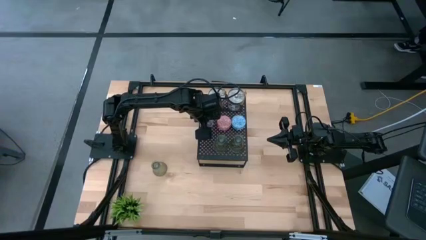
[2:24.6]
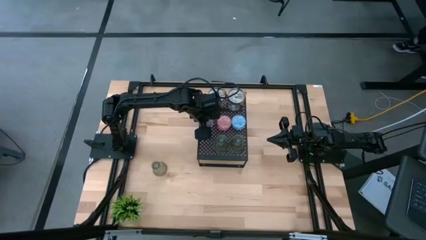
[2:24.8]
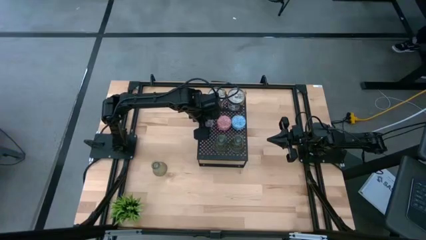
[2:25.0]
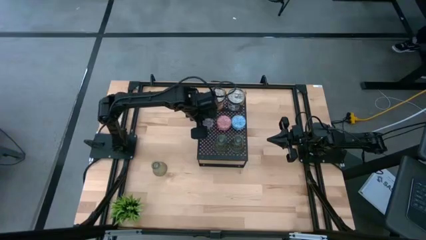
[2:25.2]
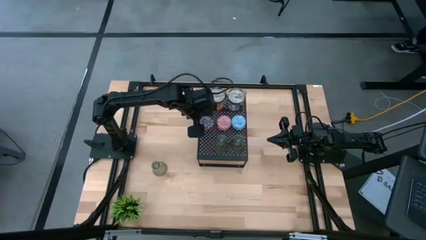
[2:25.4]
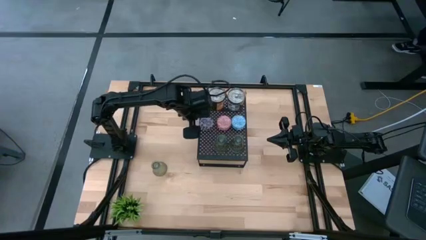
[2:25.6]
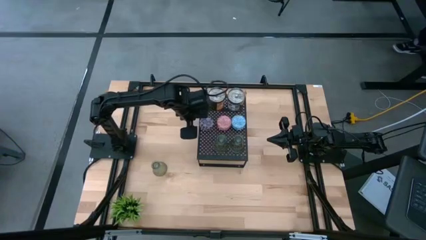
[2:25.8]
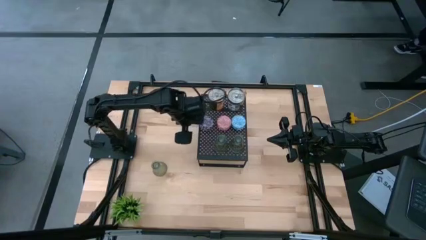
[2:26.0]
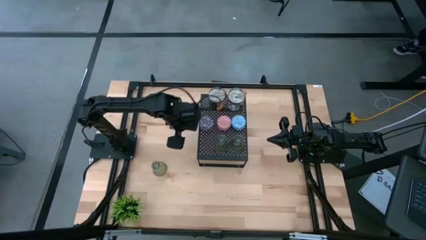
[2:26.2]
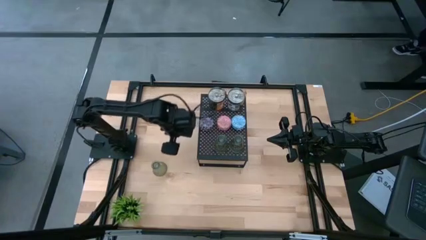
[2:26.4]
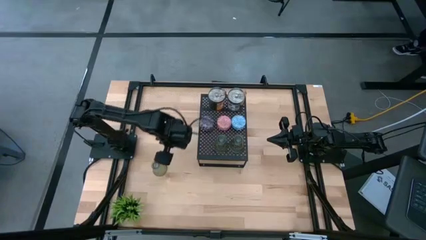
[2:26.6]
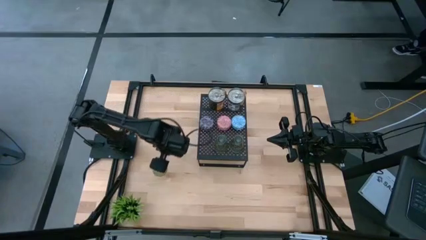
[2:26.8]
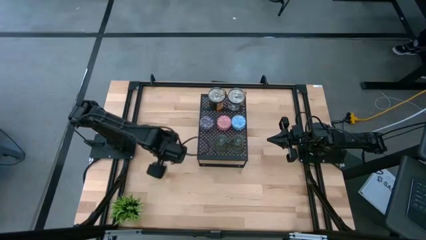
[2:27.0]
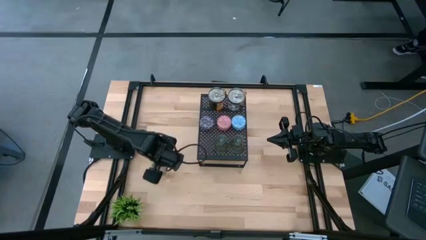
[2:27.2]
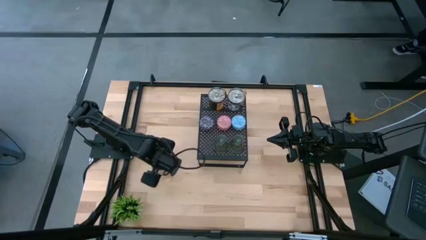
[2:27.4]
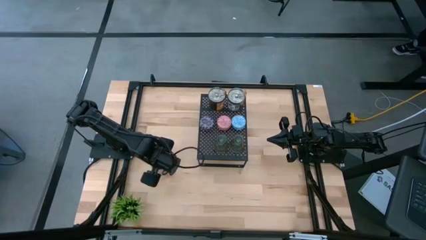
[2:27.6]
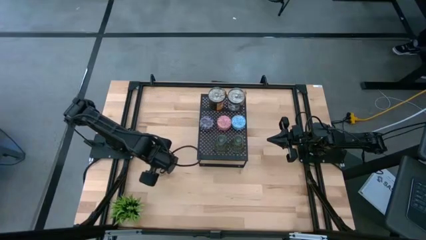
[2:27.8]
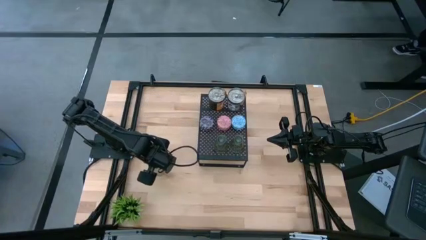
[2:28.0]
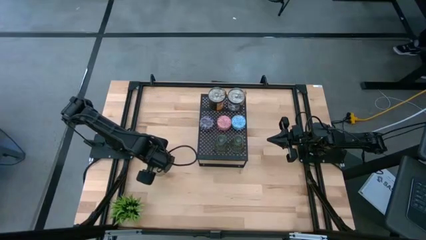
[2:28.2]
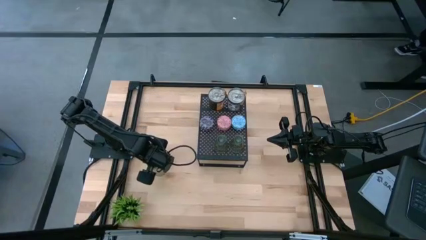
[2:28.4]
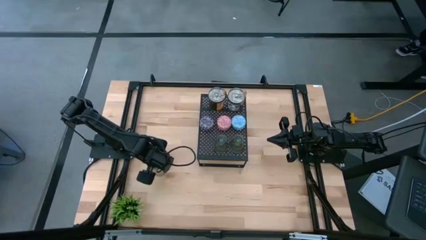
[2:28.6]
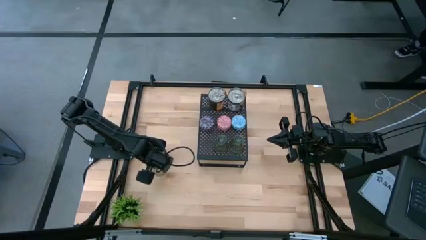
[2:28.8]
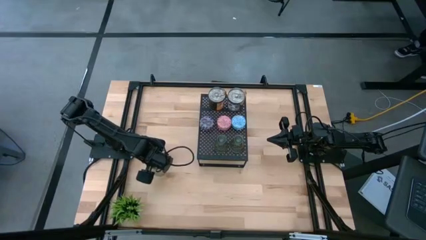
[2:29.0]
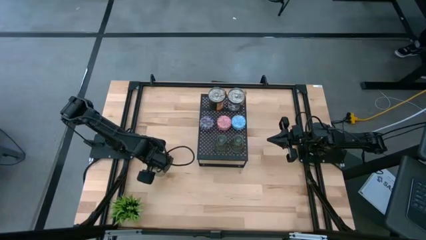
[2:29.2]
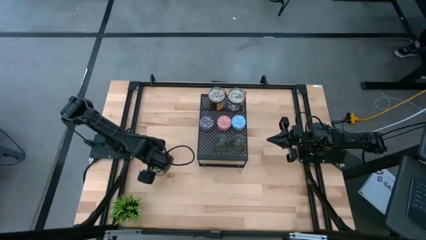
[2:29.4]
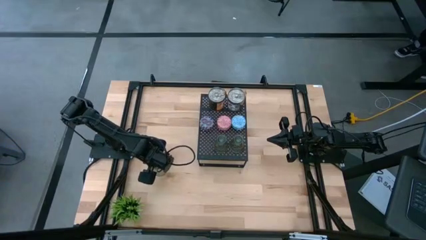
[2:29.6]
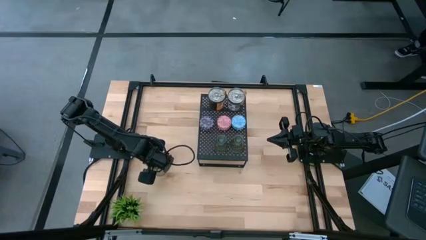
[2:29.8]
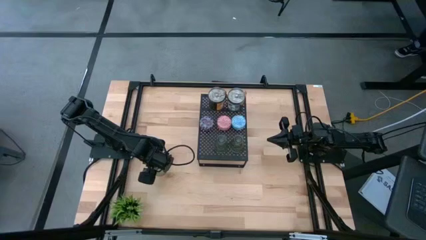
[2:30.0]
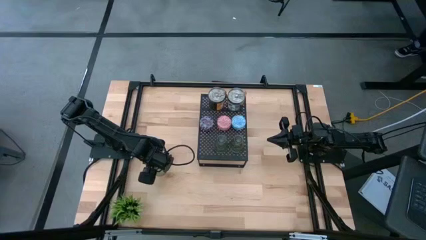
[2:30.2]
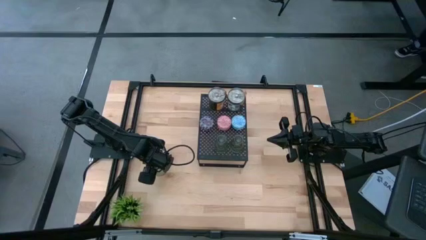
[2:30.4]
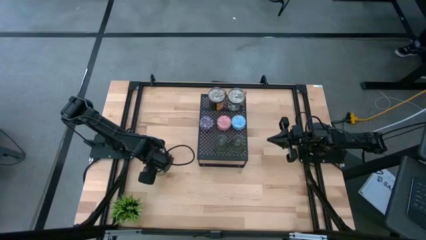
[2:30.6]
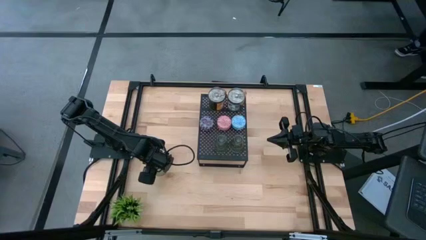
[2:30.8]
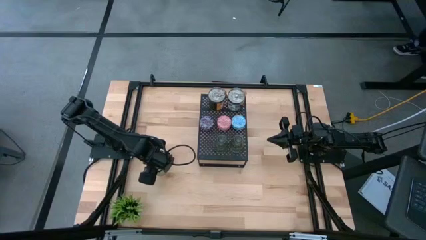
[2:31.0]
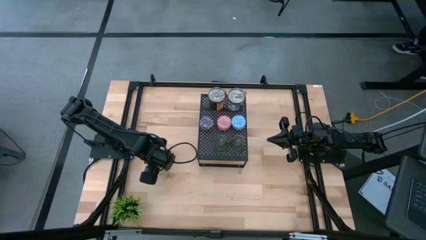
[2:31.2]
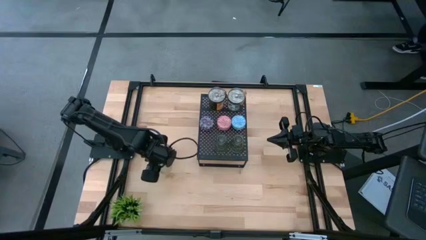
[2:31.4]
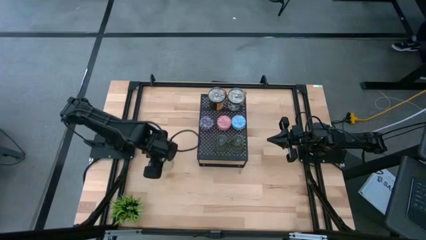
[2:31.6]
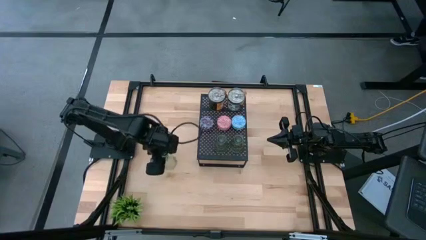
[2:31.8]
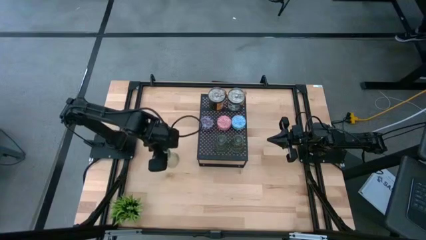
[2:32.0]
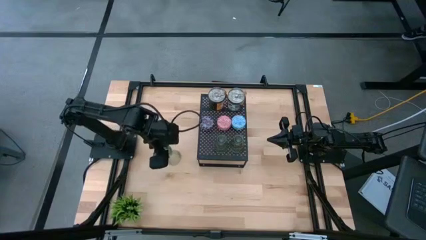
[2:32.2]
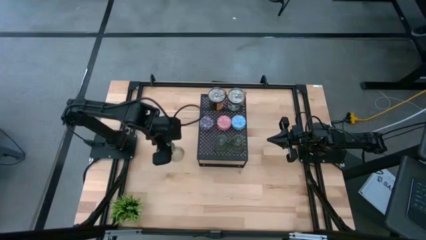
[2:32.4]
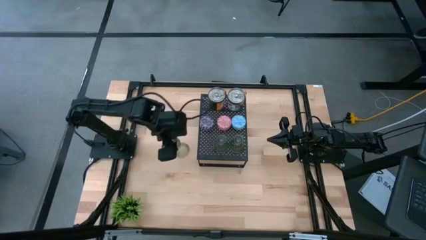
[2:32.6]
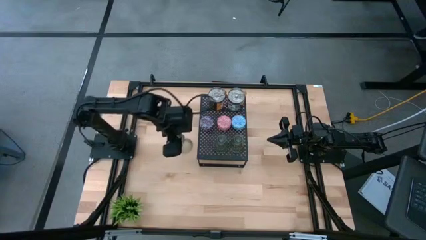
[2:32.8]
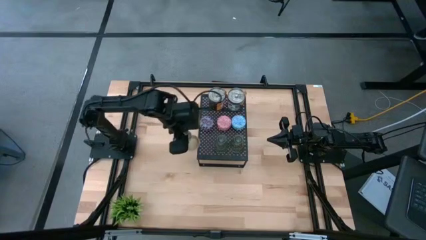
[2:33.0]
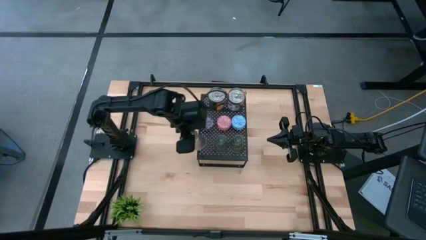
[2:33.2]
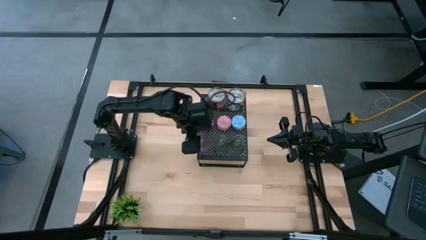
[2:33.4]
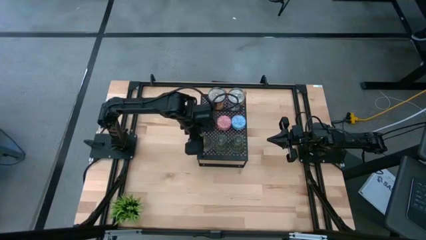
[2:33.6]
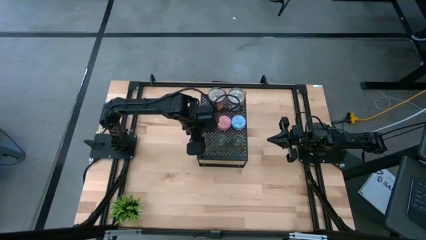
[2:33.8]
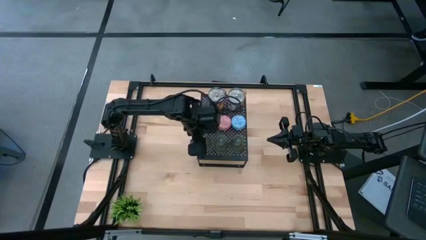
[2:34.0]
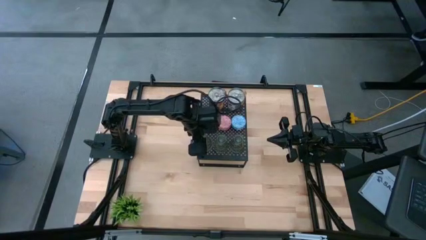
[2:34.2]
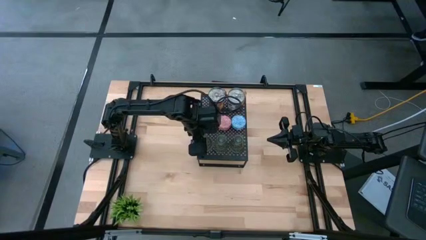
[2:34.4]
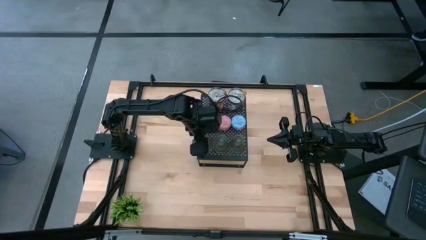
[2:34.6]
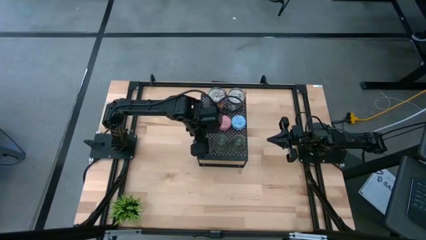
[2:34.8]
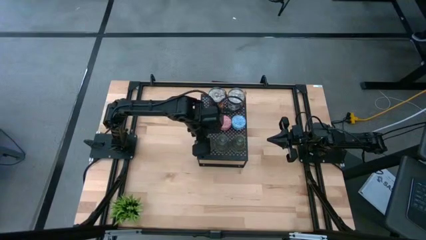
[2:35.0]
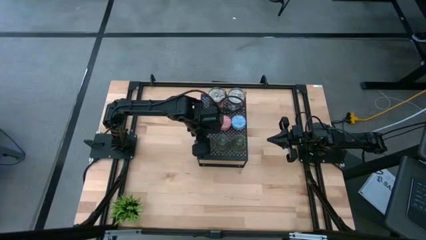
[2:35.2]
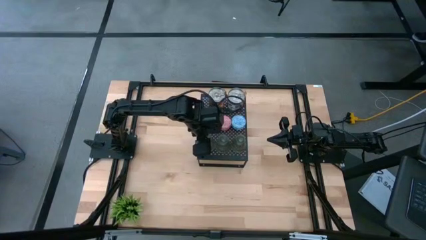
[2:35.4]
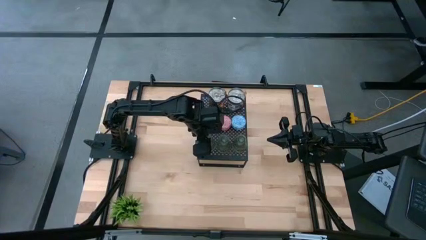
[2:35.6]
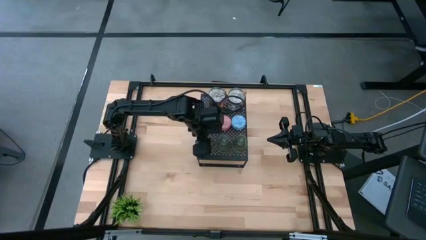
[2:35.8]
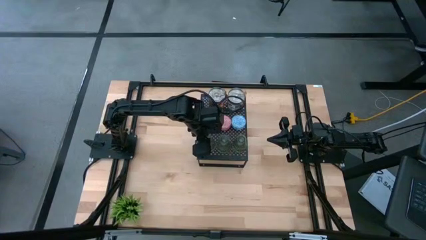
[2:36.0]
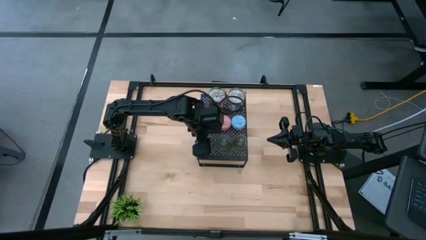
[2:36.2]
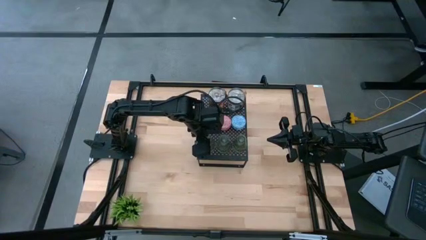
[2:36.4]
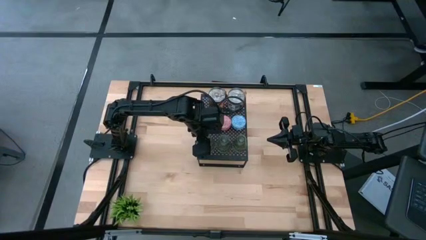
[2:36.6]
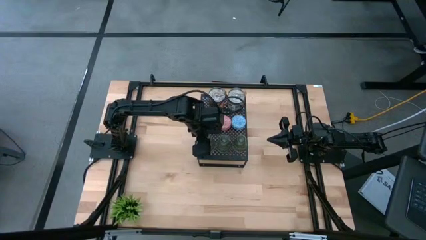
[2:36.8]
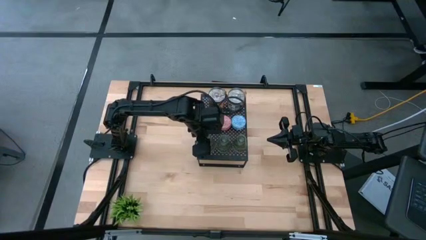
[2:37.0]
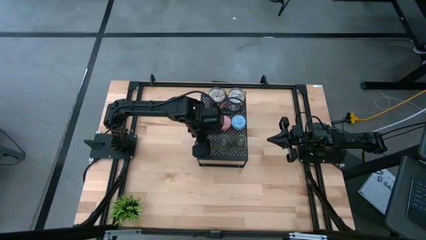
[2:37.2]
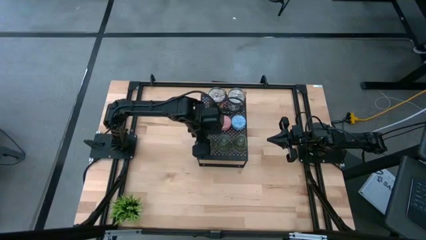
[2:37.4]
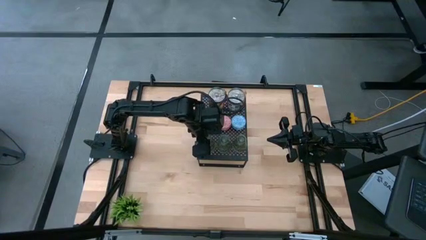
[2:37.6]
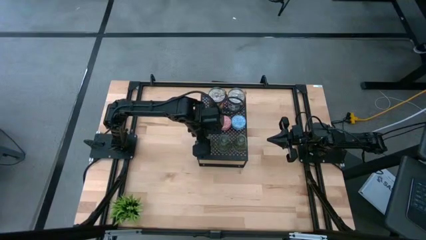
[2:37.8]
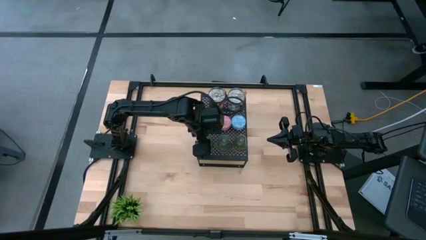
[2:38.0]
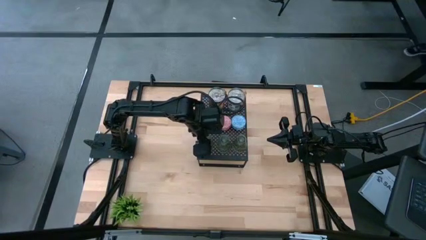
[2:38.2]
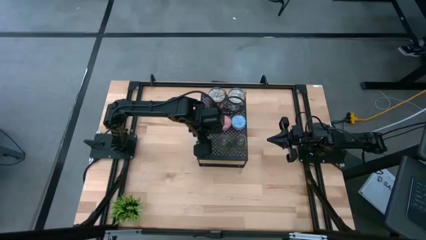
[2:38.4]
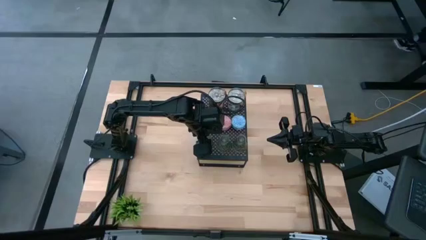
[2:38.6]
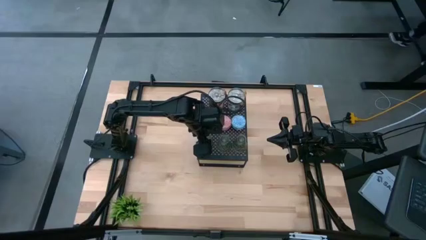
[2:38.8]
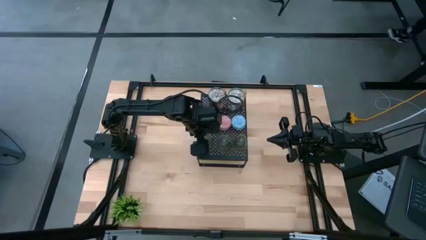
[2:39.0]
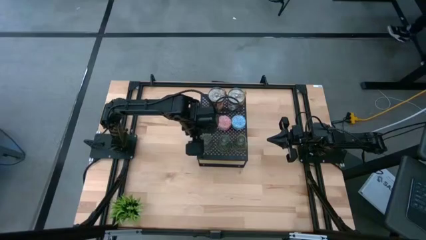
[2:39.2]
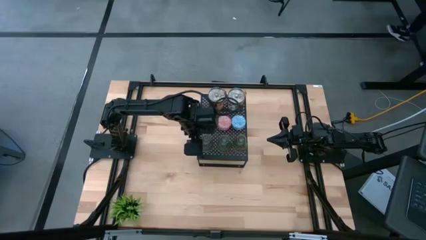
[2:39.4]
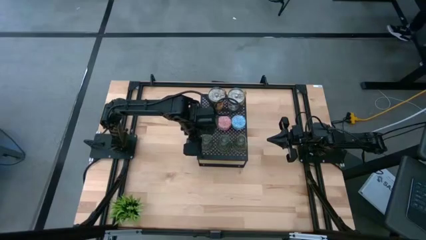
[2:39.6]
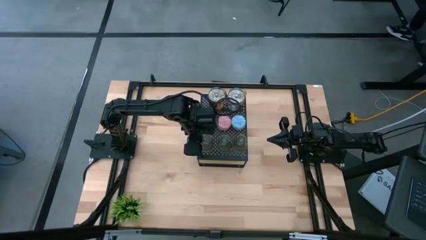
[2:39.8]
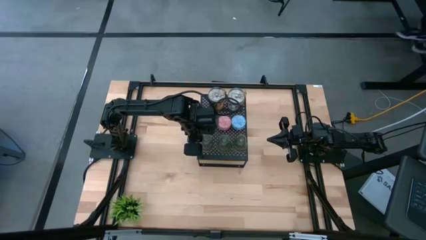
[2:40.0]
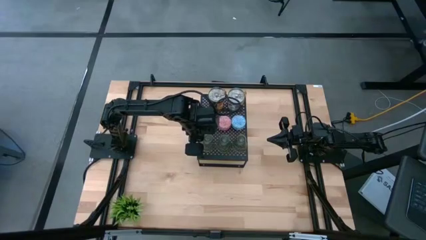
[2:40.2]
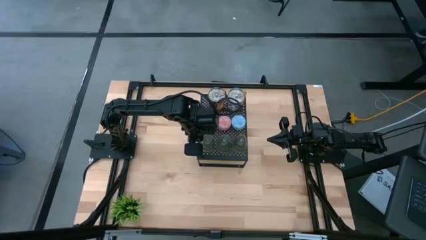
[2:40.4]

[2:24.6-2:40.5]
Task: Pick & Place candle stick holders
Put the glass candle holder on the shelf aligned with the other glass candle holder

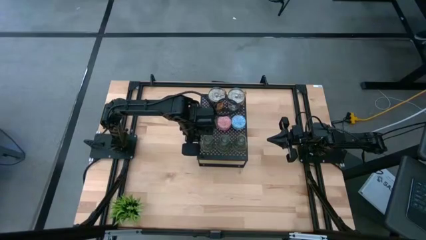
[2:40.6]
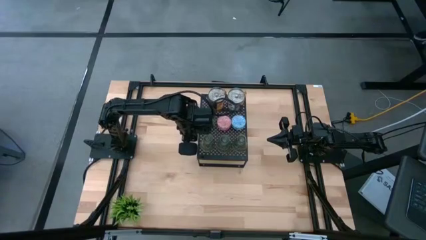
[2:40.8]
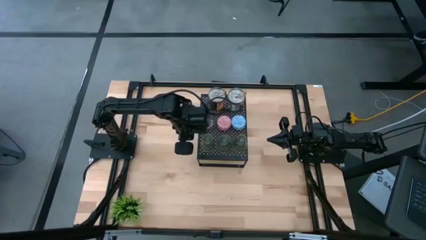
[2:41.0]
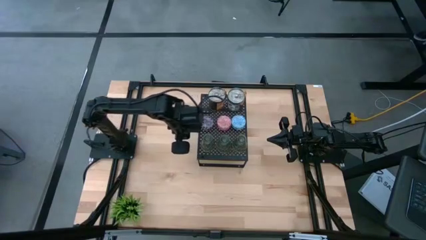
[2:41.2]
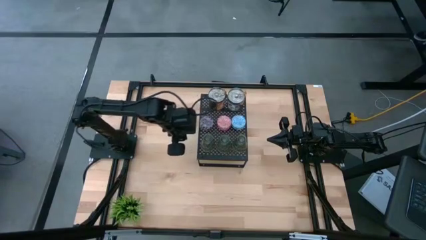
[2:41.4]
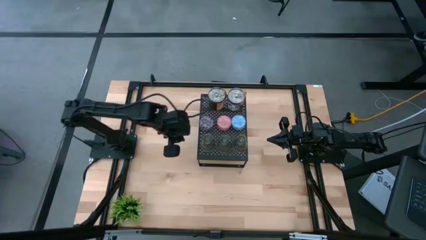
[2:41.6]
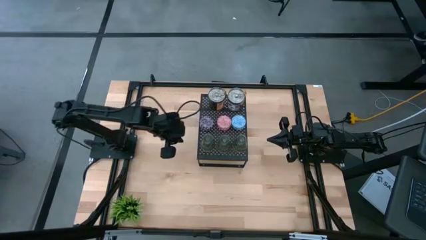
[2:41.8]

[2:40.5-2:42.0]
Return to Home Position
